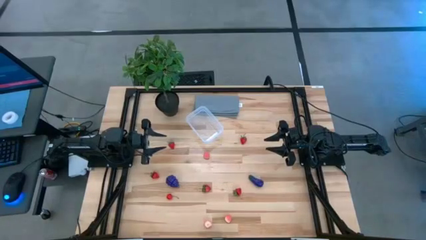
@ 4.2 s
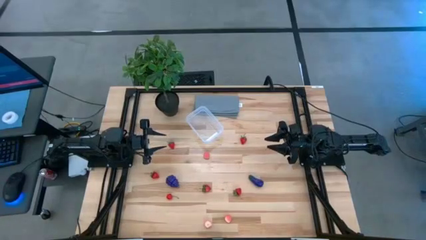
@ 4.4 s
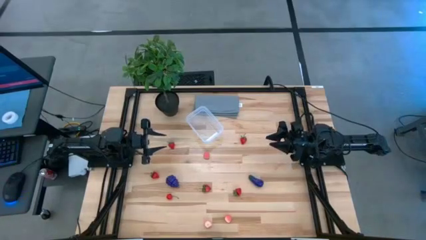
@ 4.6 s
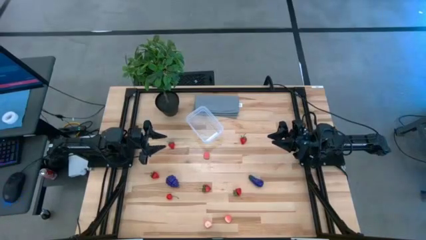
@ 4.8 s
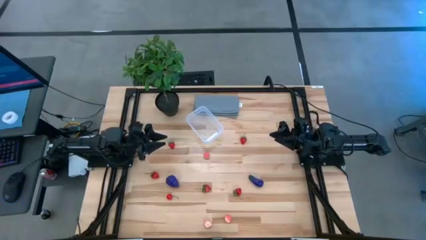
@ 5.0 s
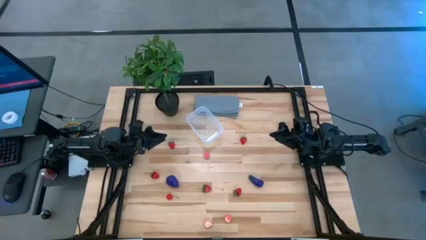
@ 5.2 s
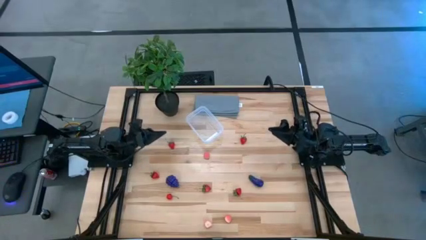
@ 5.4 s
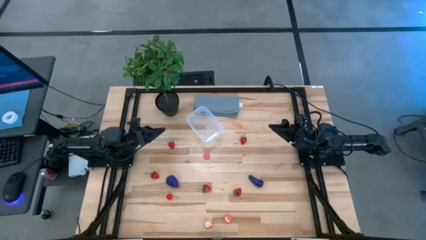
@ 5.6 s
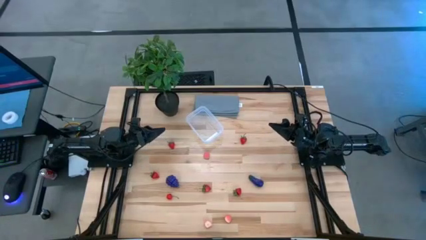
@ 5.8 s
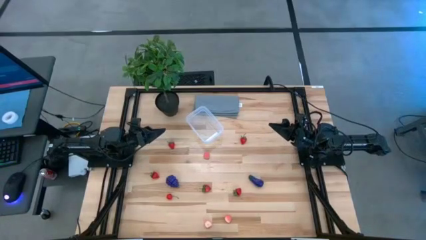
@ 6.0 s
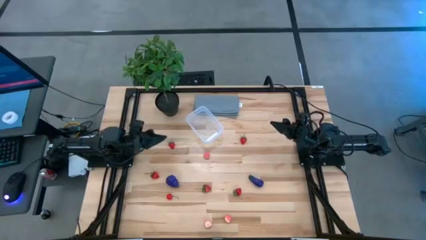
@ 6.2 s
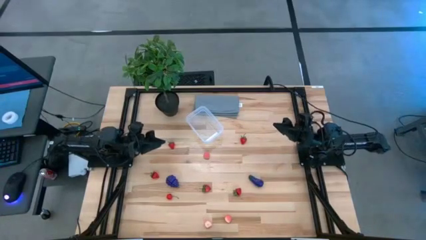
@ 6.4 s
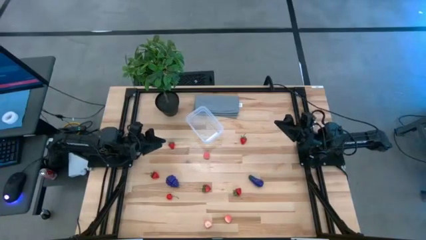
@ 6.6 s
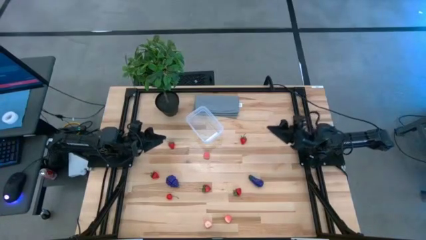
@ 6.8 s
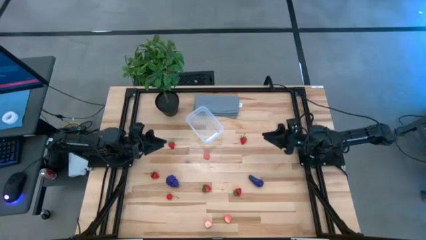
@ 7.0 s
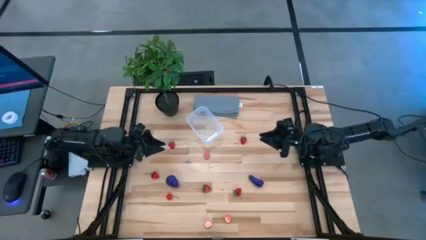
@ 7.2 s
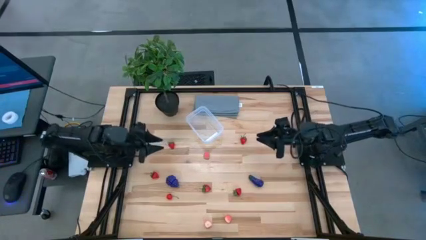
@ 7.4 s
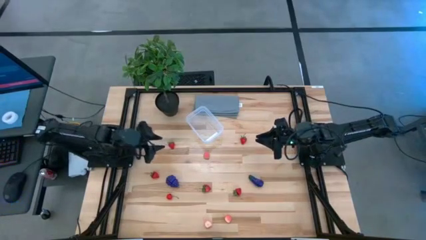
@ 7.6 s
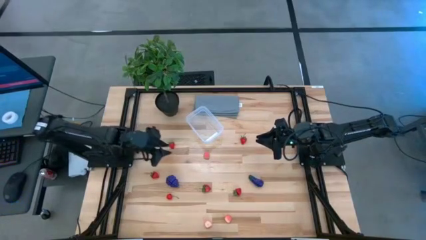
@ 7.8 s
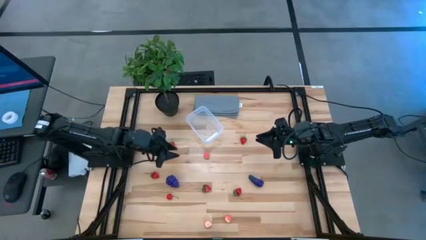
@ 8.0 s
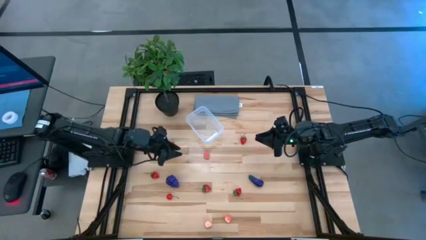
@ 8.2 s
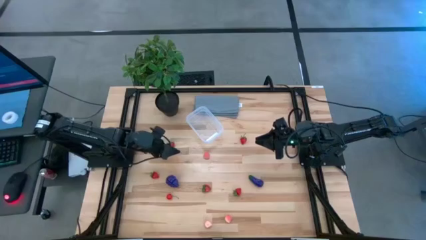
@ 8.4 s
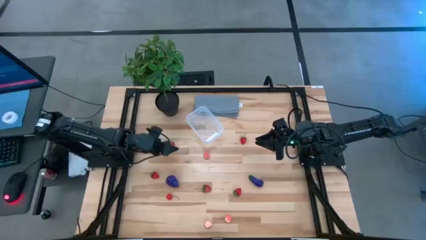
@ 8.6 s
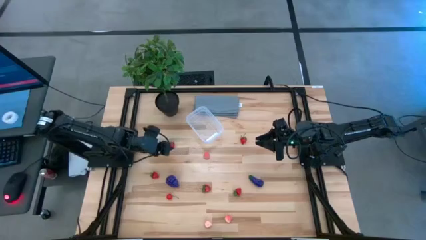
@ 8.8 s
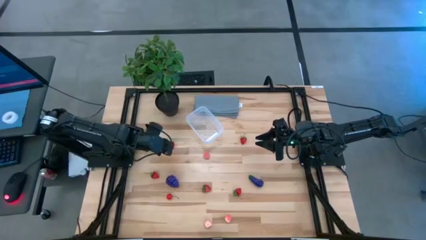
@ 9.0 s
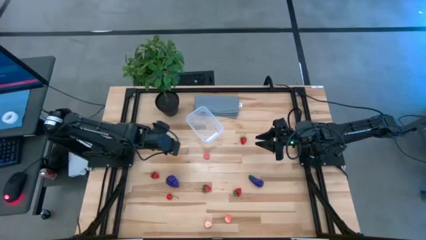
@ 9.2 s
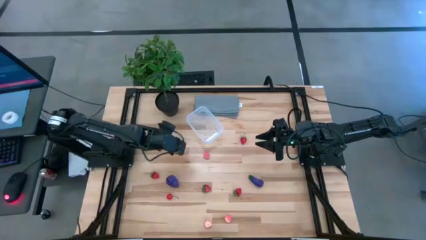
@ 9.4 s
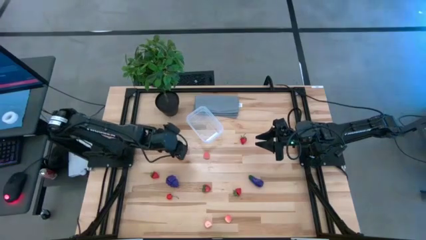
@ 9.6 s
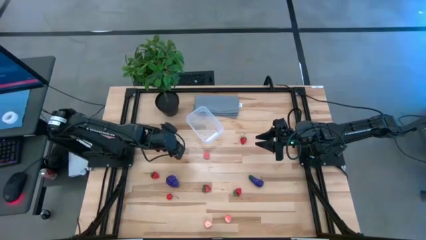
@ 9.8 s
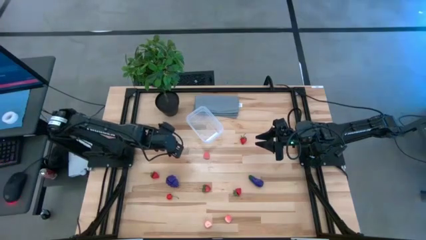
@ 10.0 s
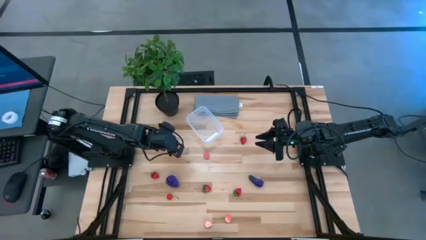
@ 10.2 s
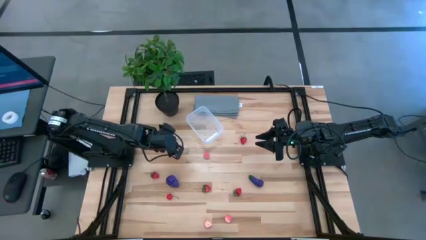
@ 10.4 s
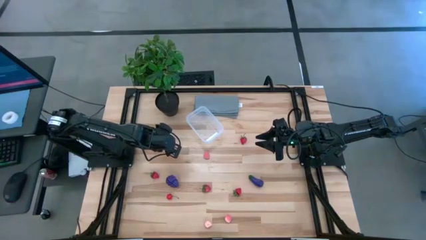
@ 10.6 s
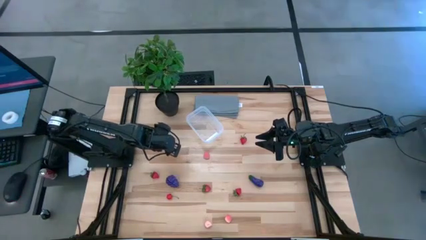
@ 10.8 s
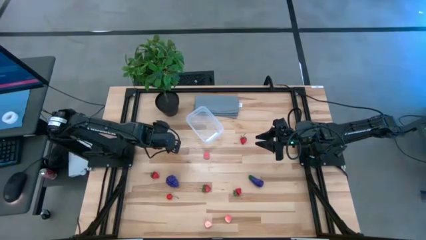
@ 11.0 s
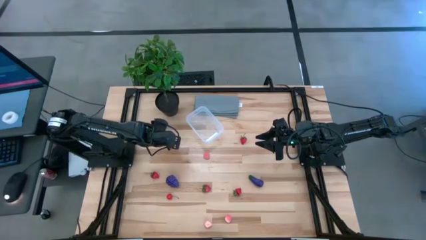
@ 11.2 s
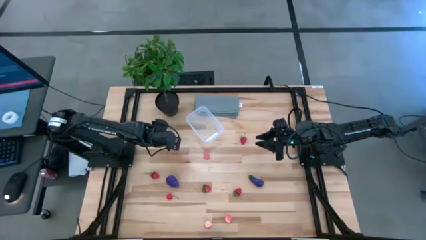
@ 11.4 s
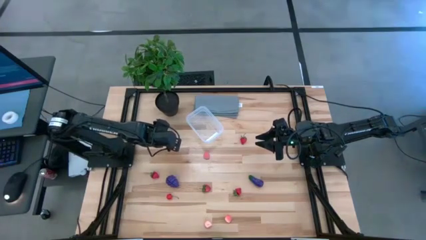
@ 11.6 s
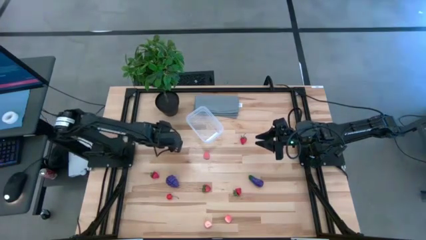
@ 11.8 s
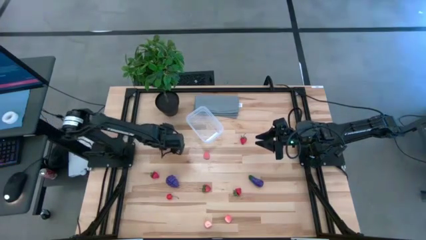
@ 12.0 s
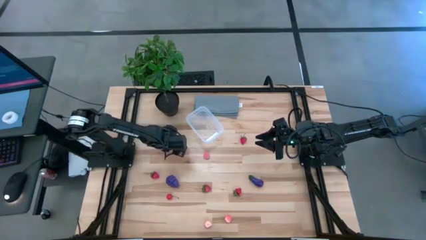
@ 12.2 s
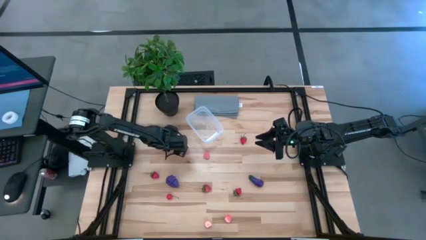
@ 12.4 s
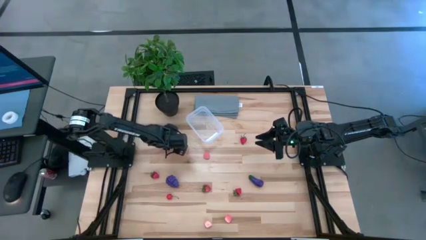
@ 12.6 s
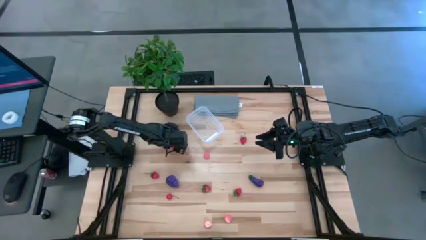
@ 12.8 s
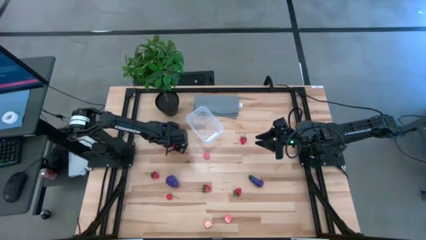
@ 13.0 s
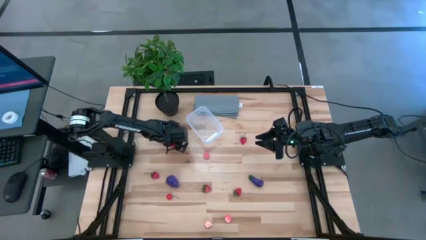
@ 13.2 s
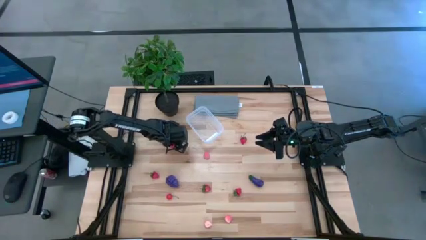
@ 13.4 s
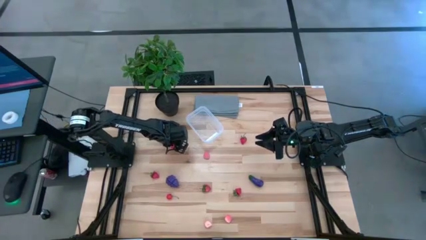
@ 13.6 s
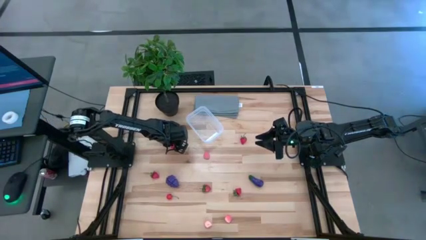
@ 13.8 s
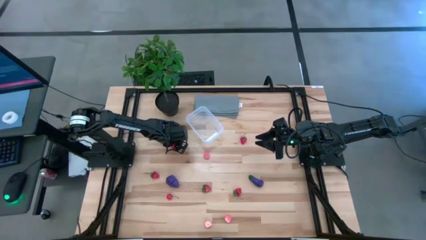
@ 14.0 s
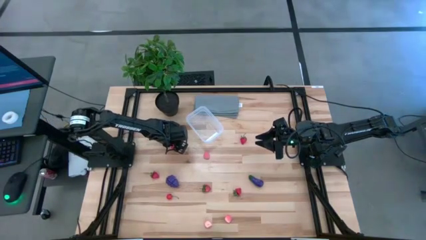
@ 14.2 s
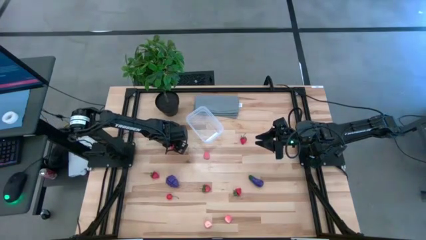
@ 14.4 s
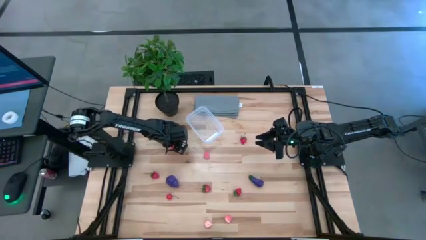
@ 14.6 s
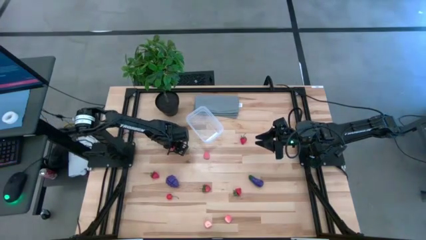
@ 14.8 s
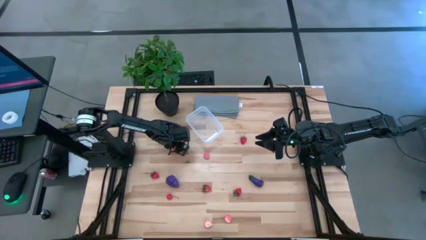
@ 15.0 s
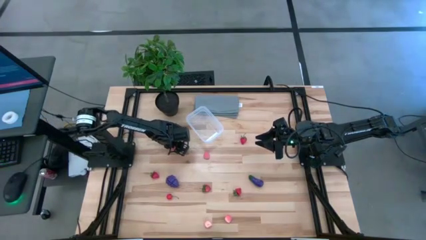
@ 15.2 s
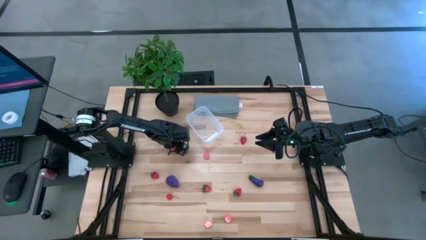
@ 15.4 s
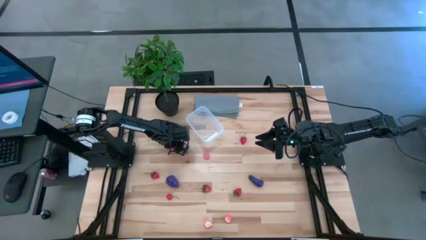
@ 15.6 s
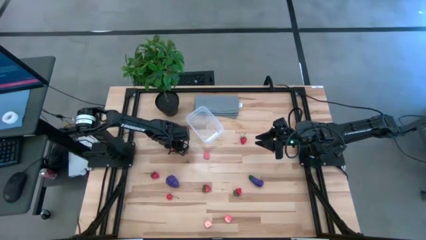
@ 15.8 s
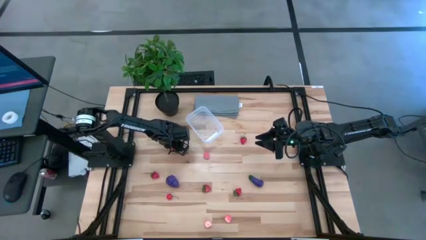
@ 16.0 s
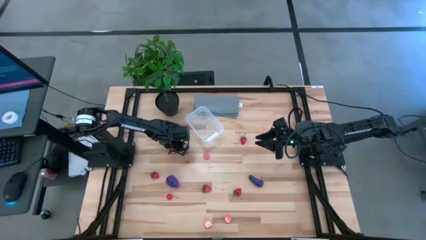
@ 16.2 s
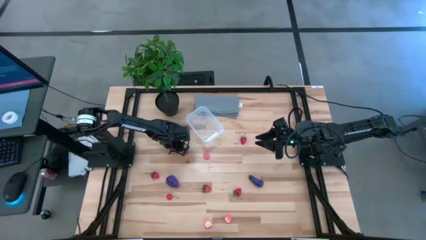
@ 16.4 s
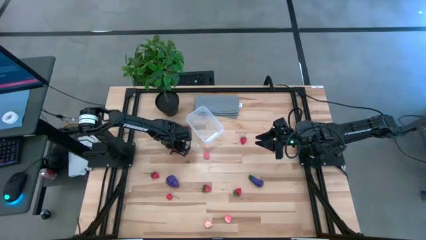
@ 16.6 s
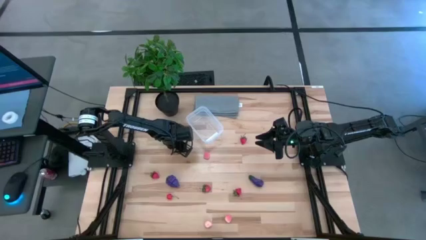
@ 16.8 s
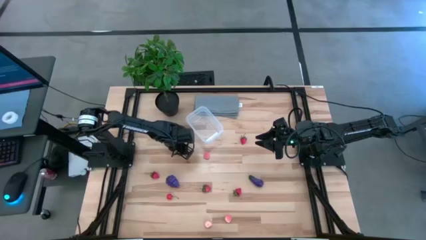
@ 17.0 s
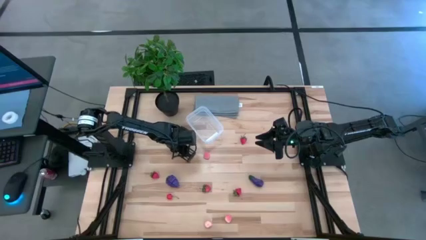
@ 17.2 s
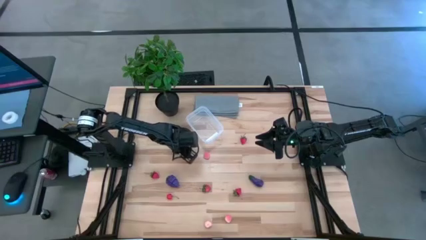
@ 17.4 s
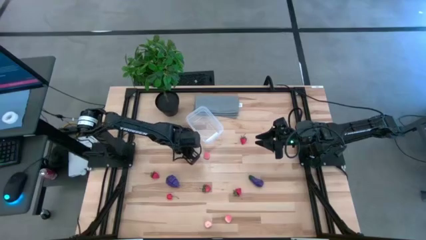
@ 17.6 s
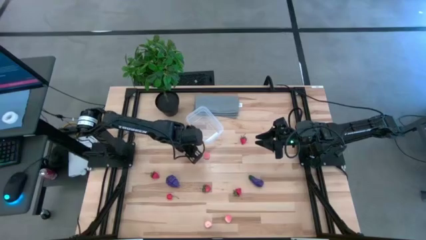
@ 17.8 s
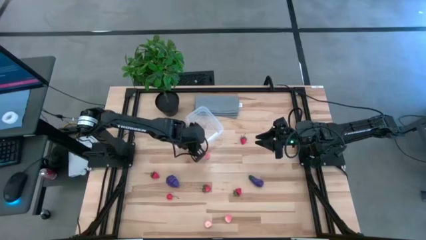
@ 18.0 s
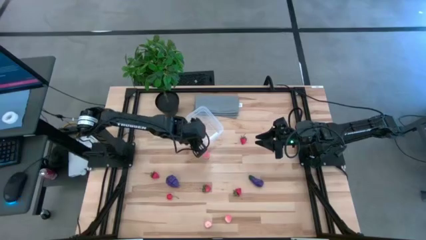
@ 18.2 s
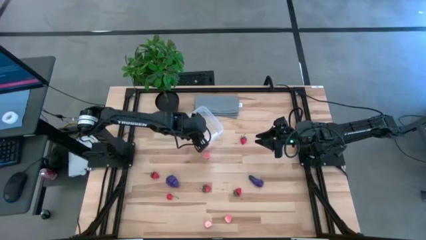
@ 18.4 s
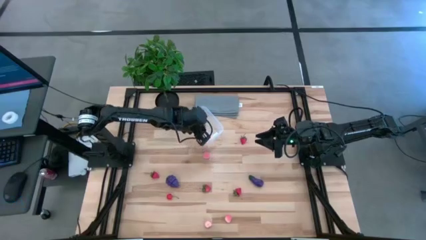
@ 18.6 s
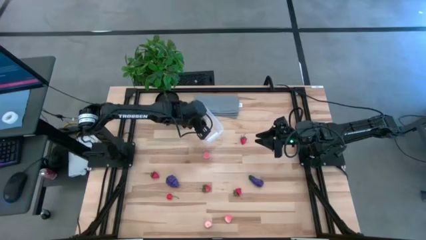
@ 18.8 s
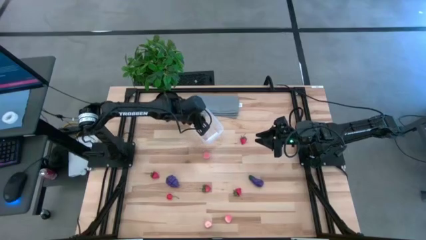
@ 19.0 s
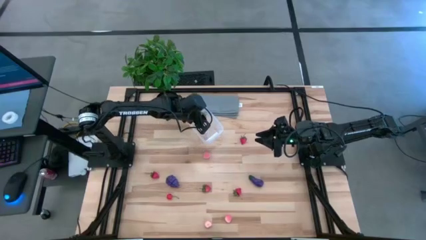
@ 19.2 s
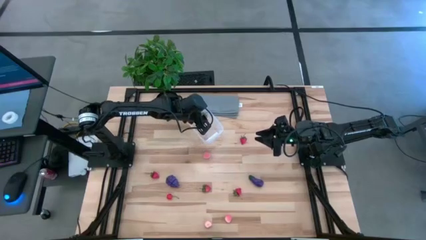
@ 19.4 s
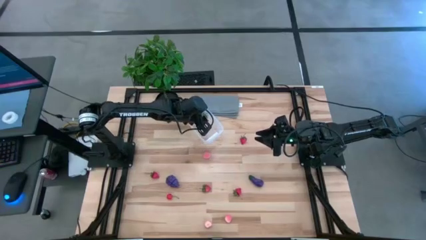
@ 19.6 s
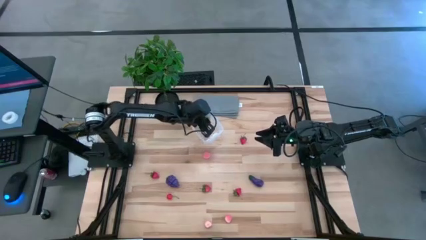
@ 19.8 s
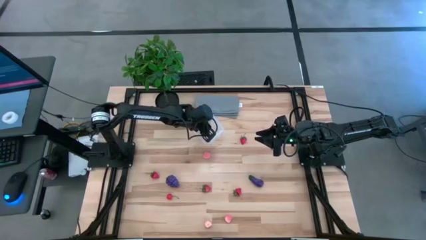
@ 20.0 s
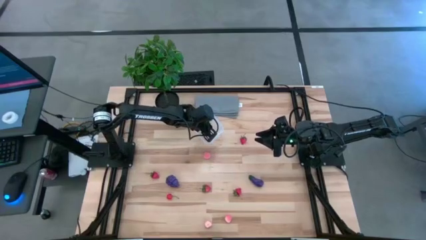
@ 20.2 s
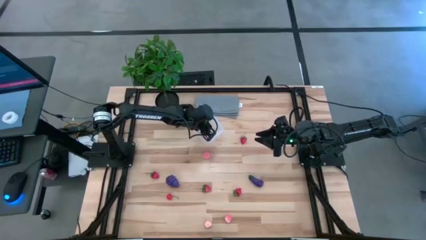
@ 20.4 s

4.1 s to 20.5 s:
Task: Pick and placing Produce into tupperware
Put the red strawberry into the transparent bin
